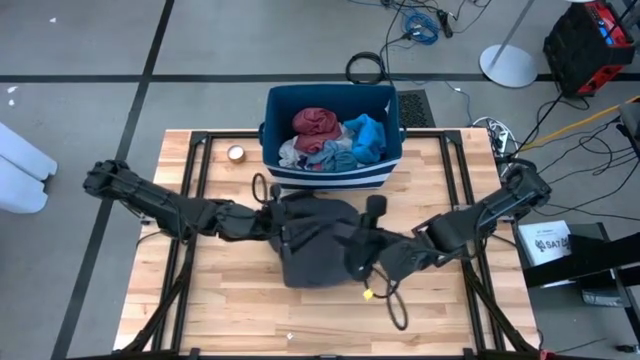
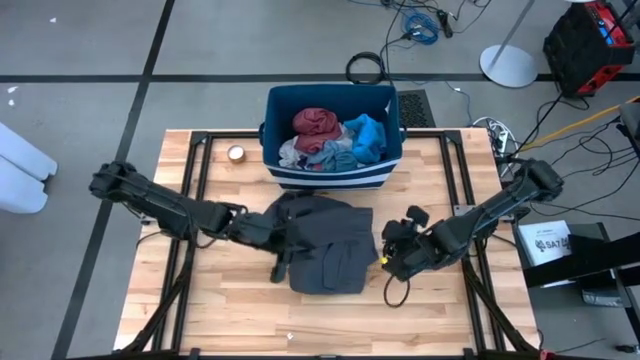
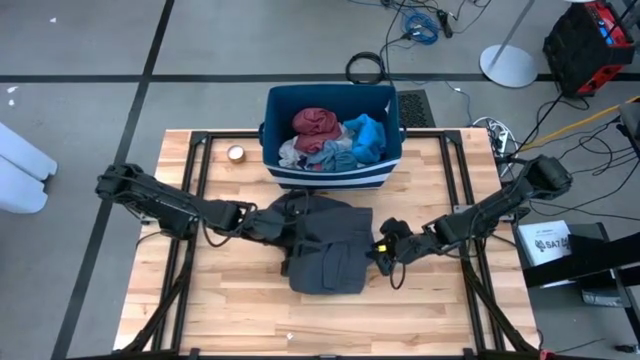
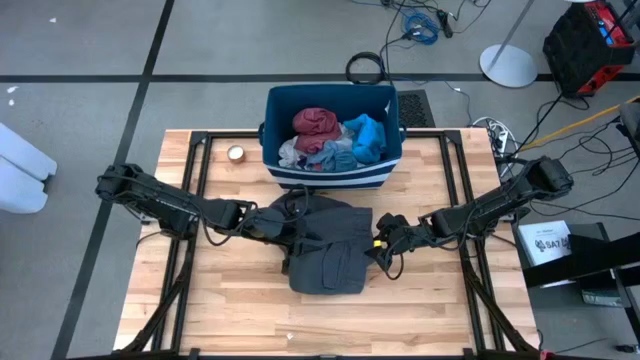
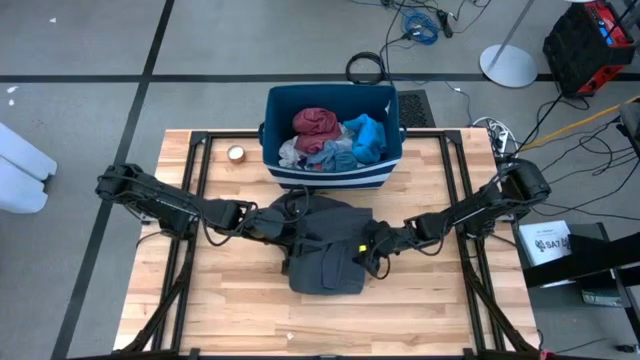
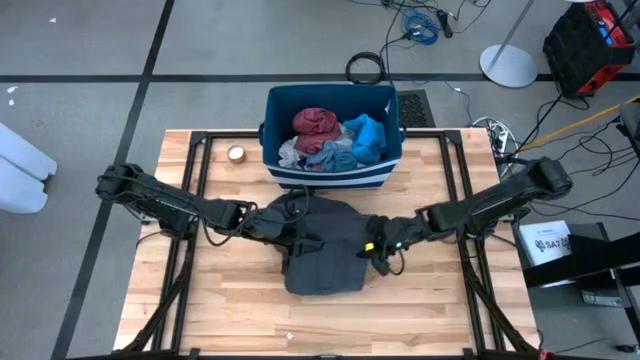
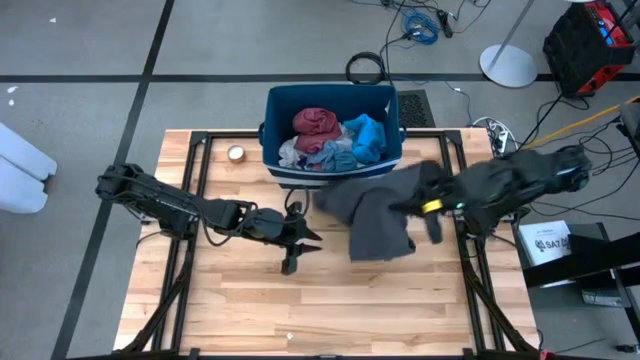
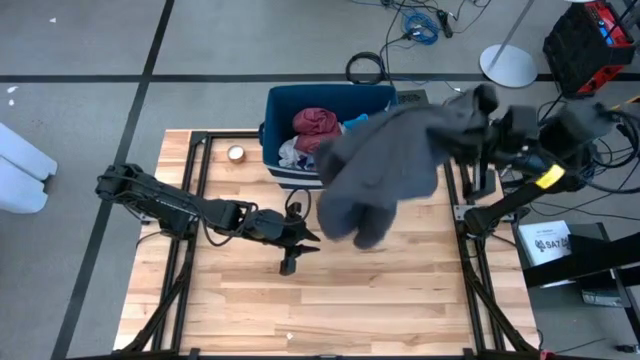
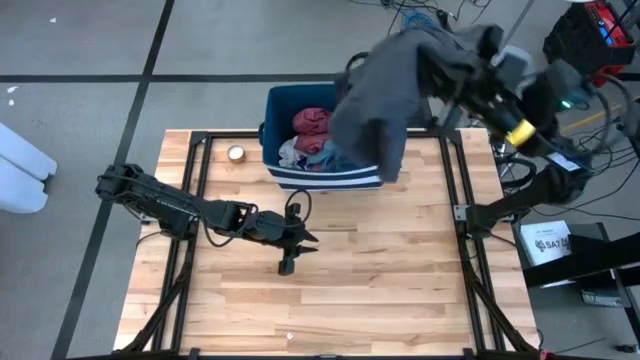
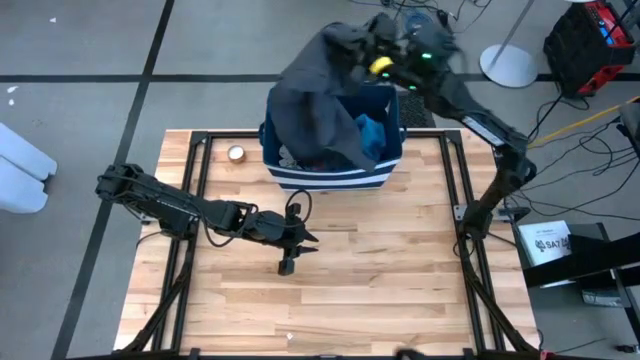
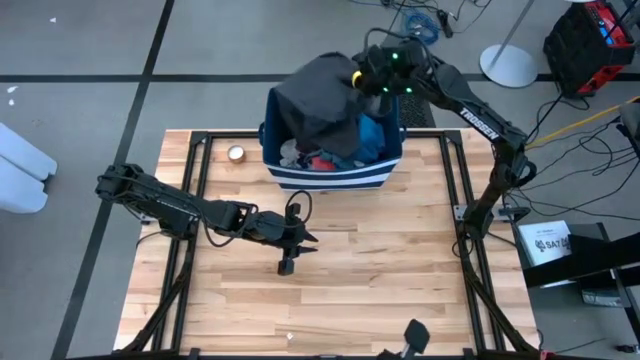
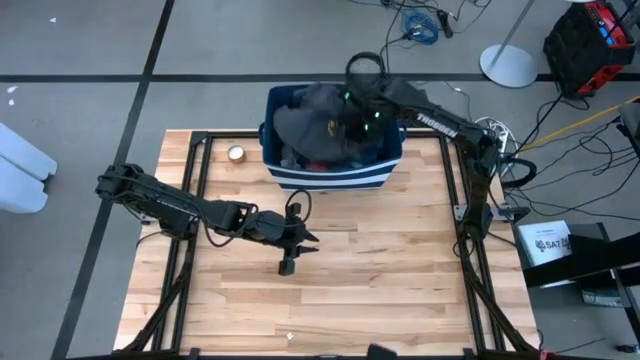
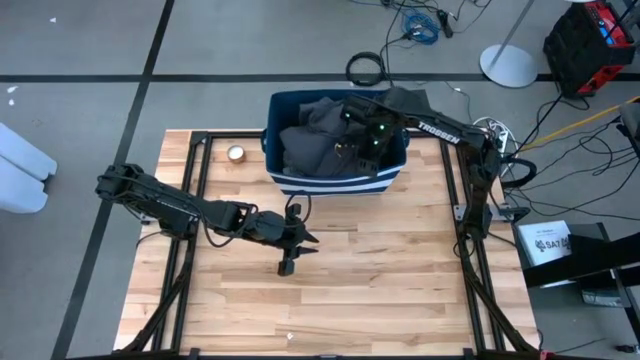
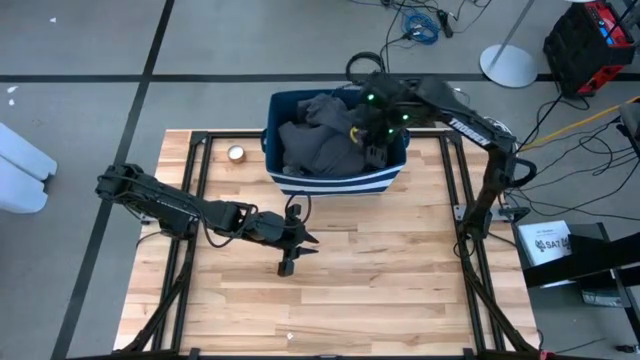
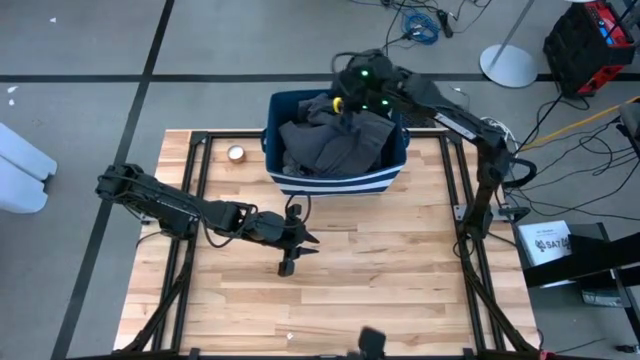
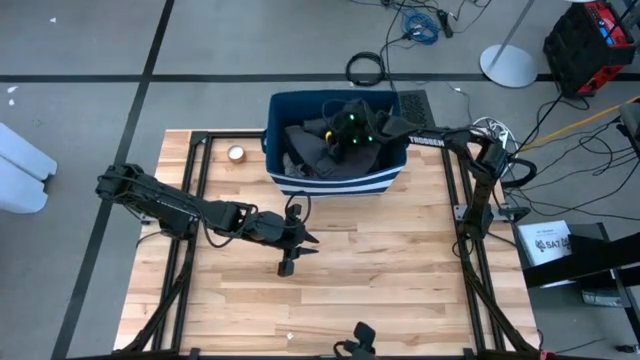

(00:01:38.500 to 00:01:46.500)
Task: Sort clothes
Put the gray short into the blue bin

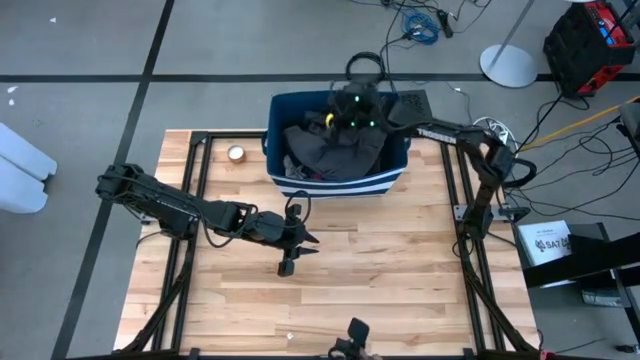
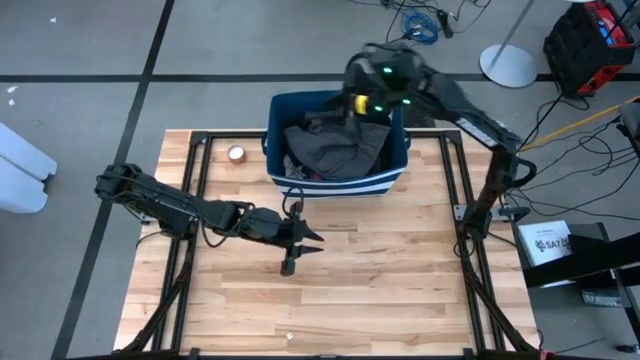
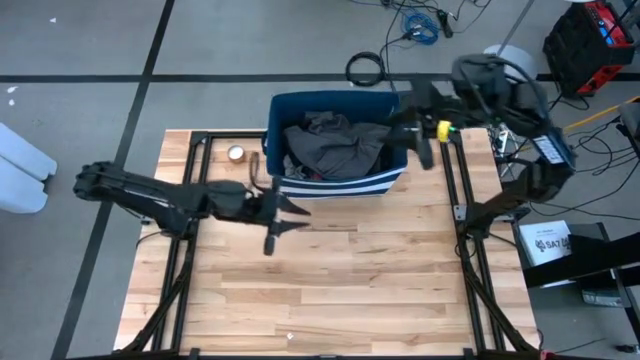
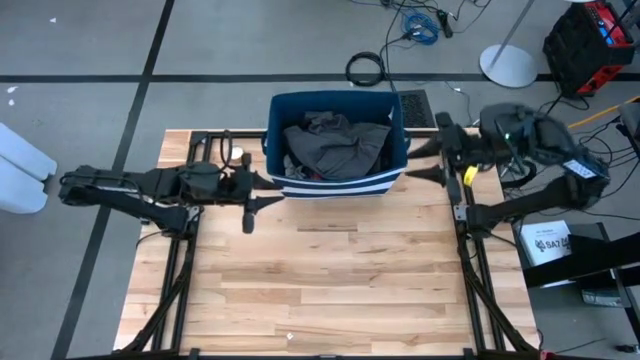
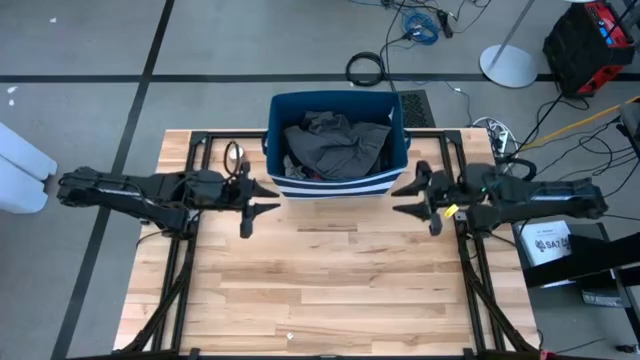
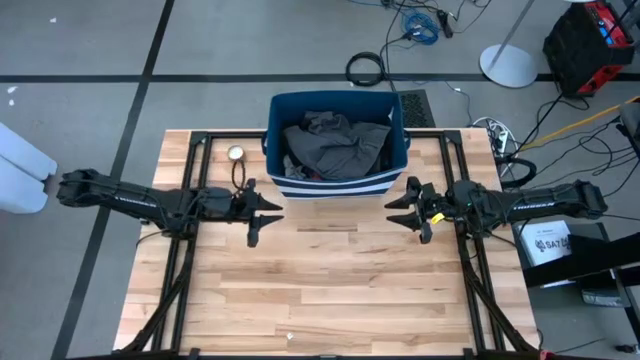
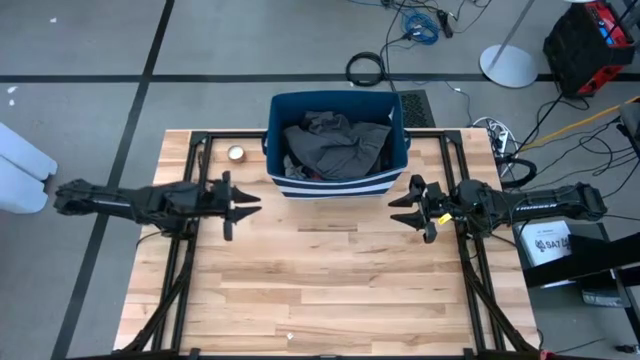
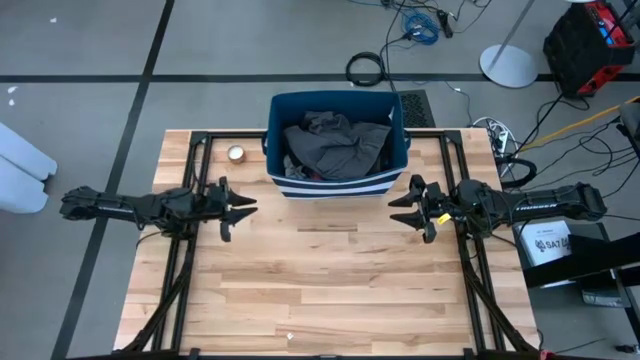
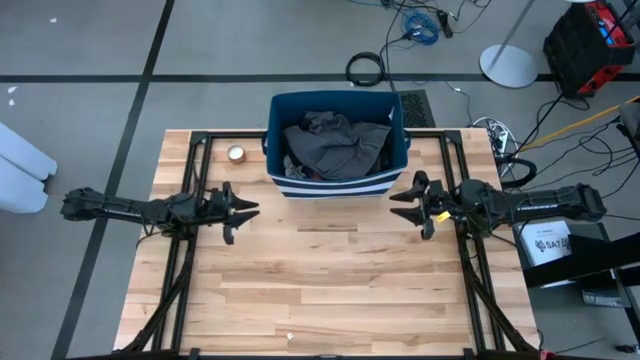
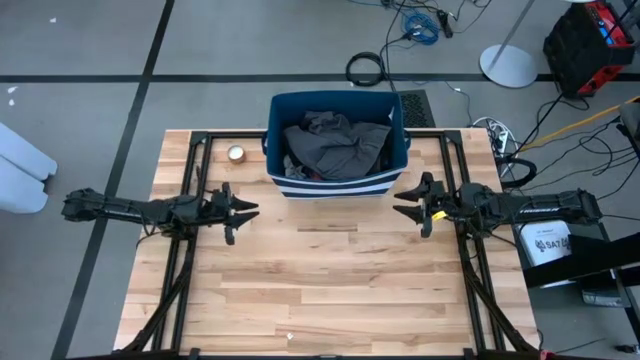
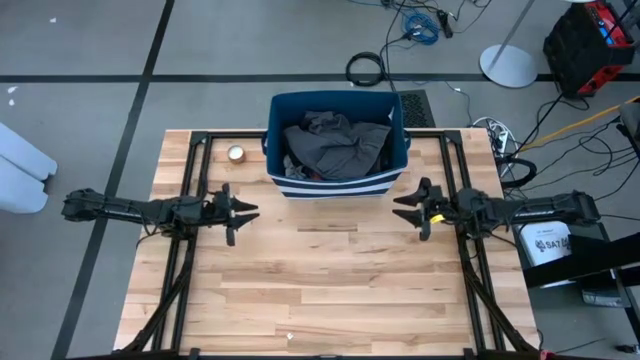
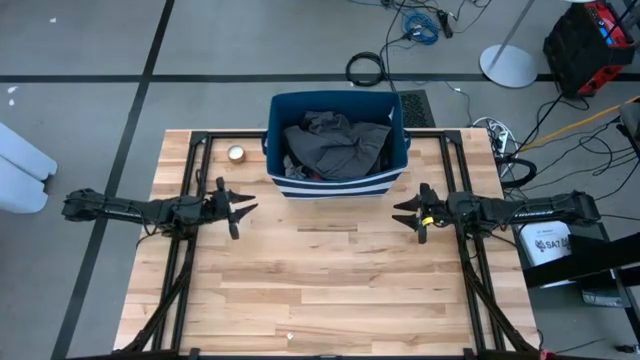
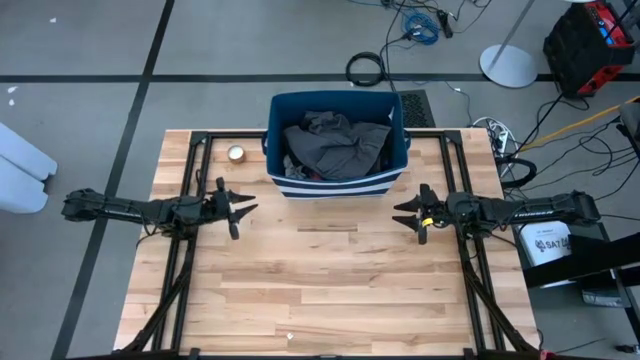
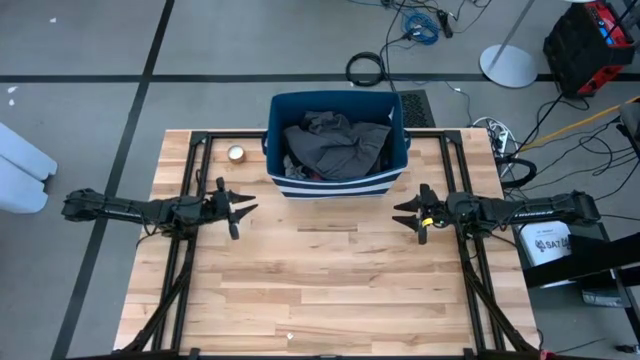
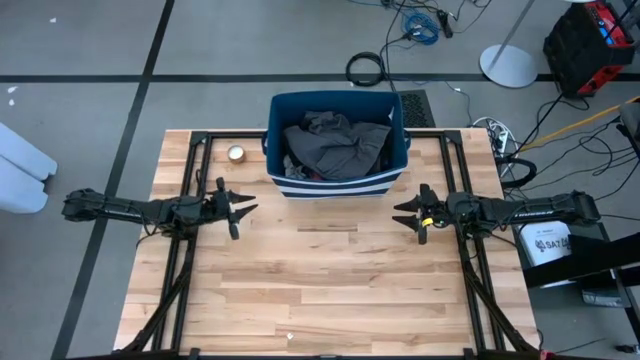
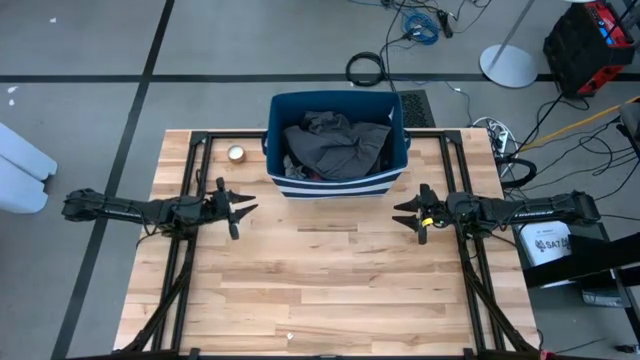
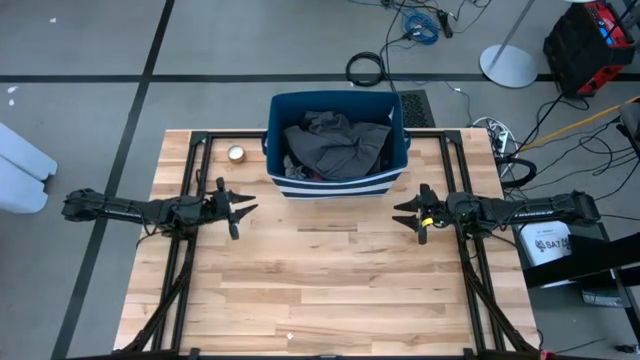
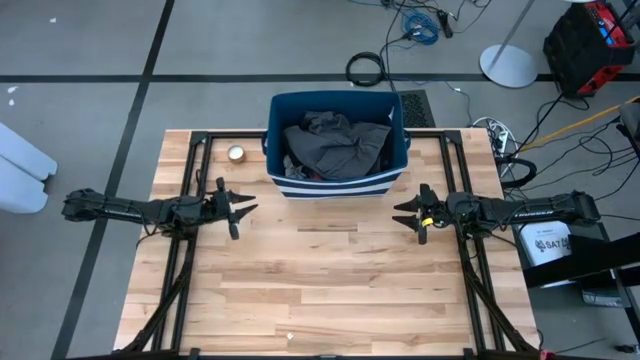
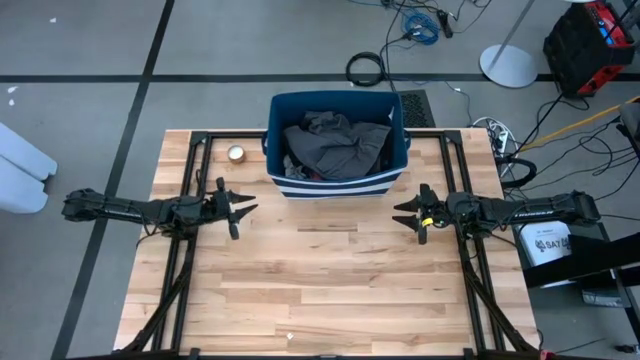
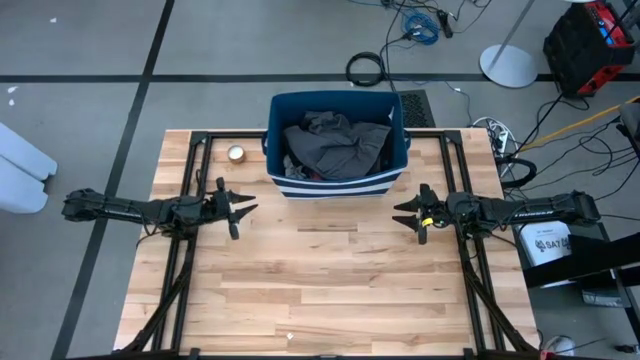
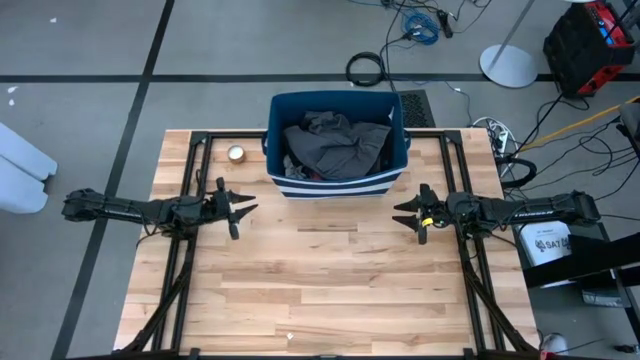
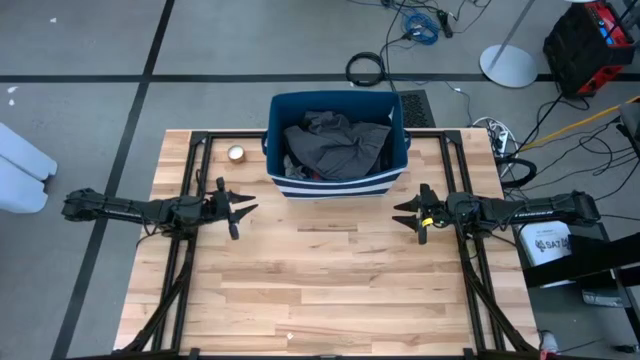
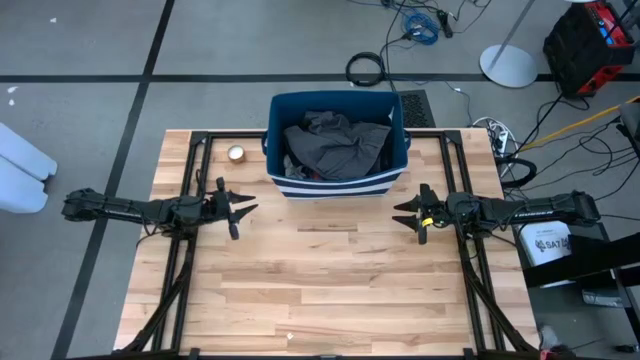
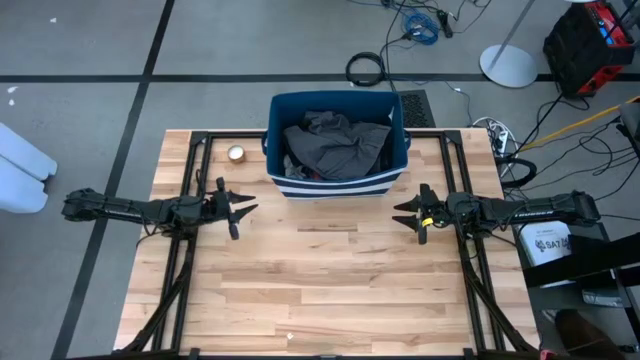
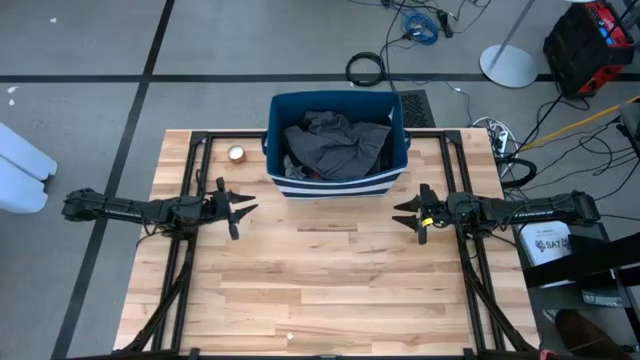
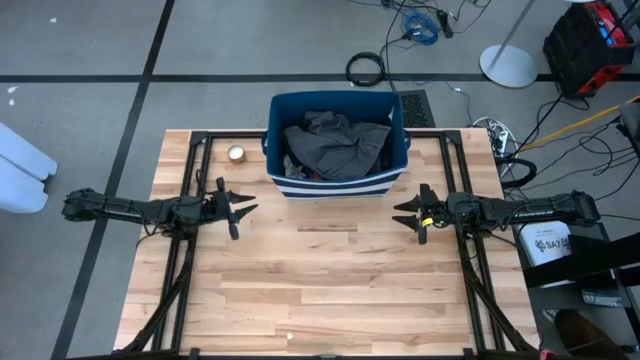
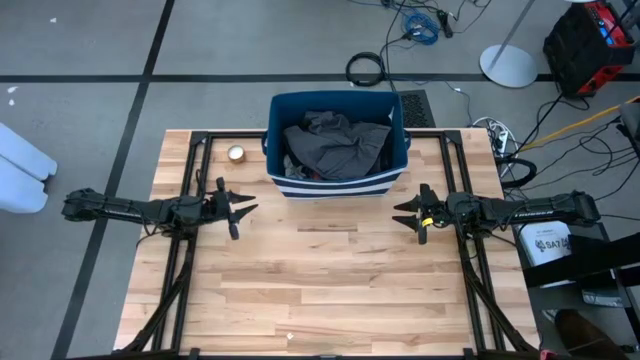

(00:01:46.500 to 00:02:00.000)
Return to Home Position
